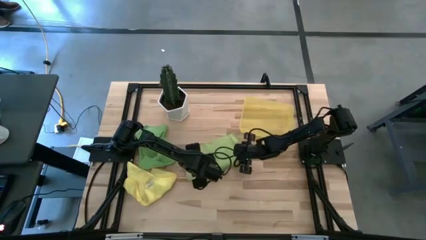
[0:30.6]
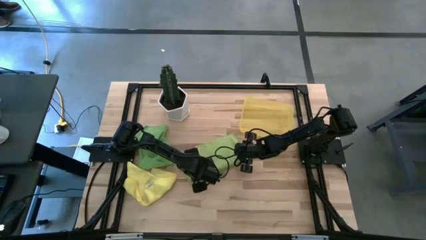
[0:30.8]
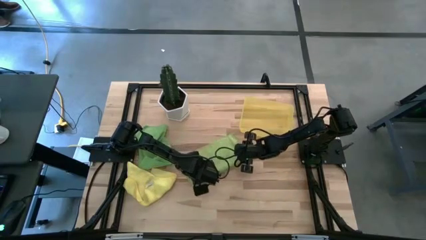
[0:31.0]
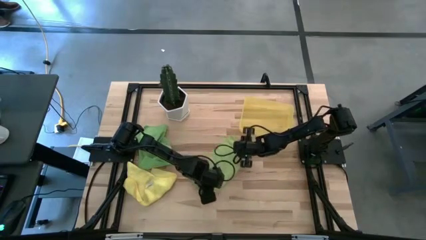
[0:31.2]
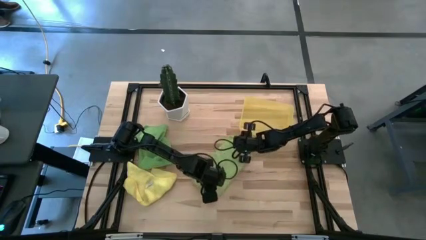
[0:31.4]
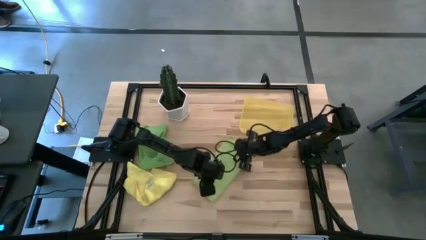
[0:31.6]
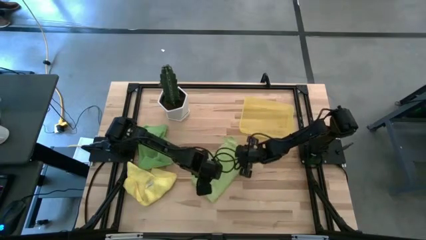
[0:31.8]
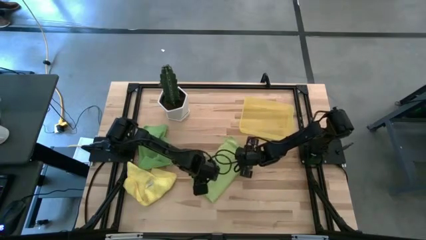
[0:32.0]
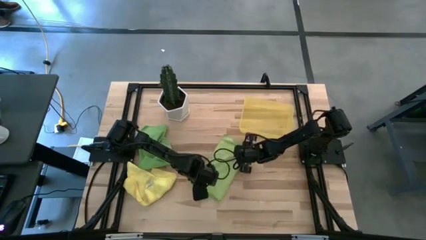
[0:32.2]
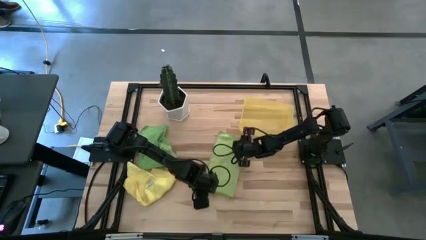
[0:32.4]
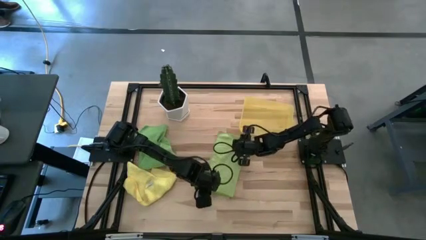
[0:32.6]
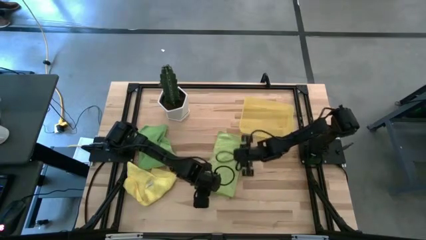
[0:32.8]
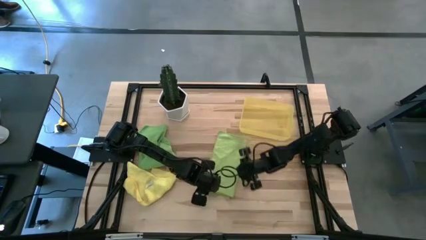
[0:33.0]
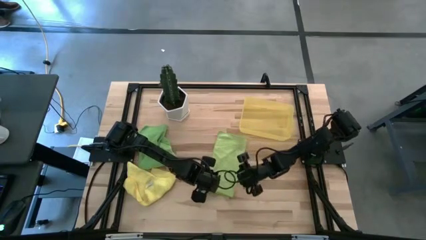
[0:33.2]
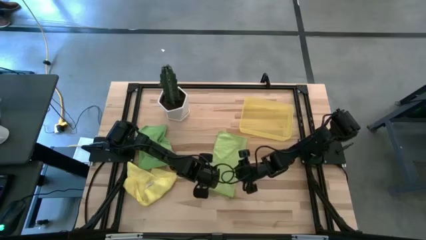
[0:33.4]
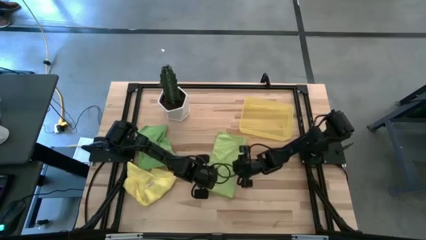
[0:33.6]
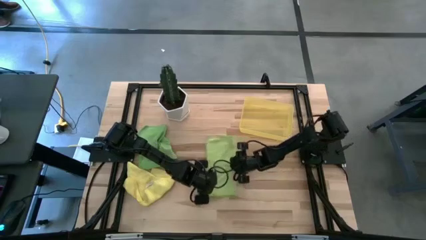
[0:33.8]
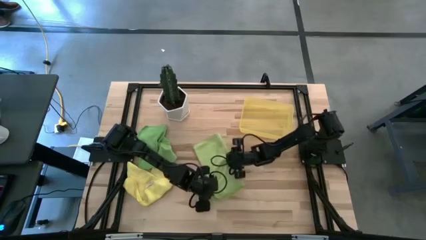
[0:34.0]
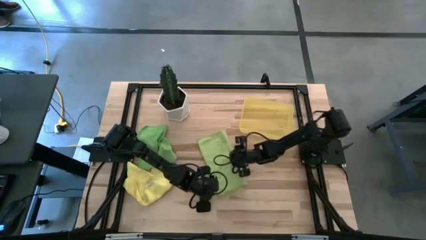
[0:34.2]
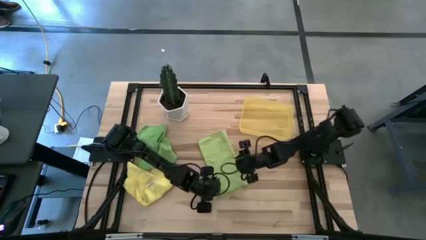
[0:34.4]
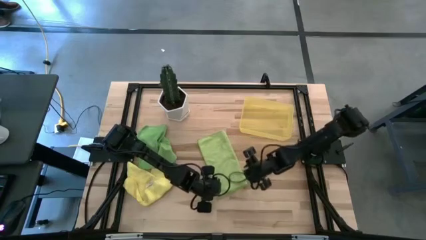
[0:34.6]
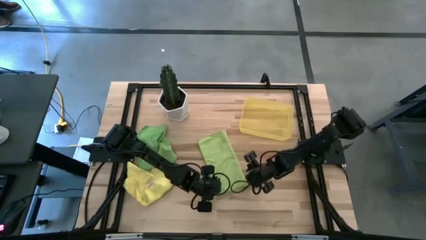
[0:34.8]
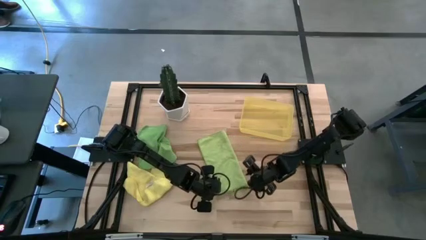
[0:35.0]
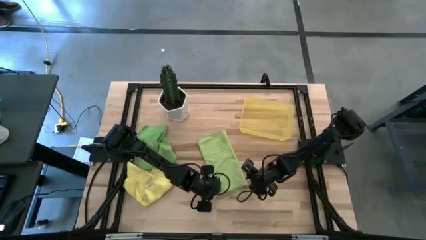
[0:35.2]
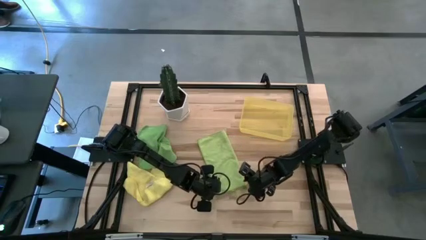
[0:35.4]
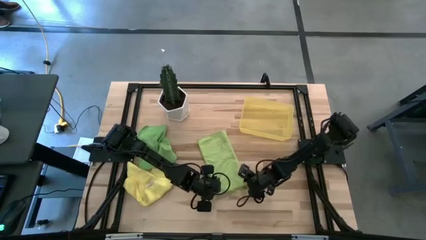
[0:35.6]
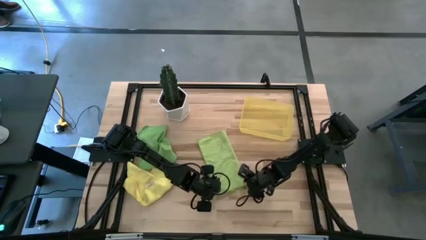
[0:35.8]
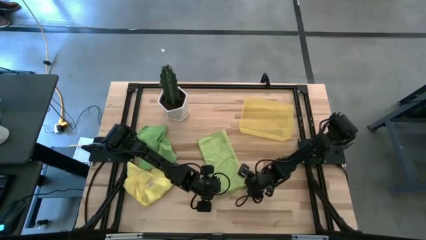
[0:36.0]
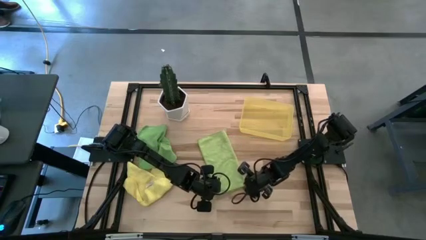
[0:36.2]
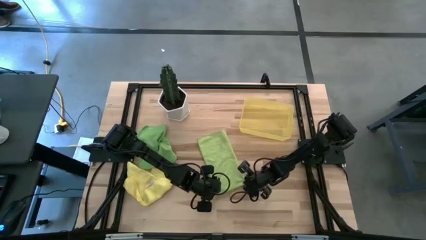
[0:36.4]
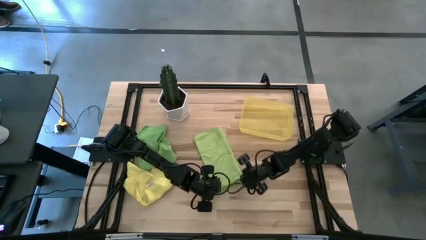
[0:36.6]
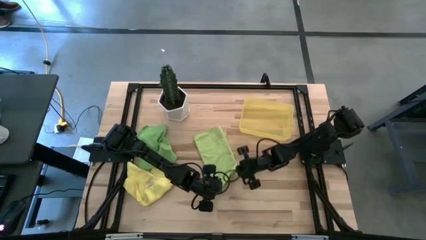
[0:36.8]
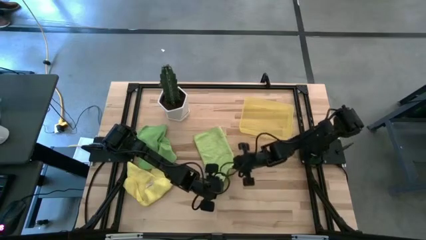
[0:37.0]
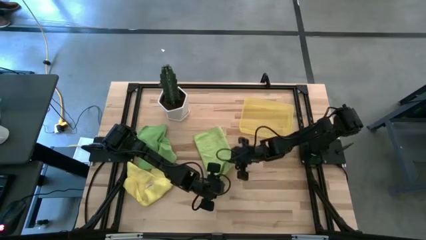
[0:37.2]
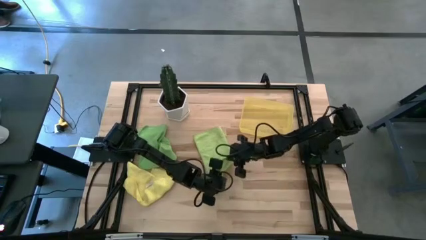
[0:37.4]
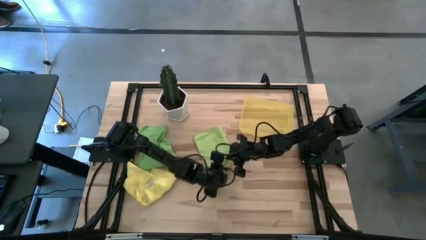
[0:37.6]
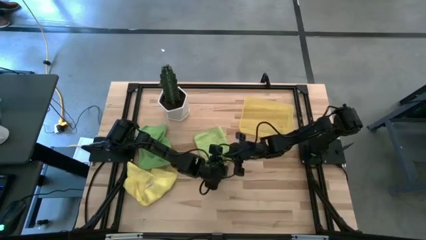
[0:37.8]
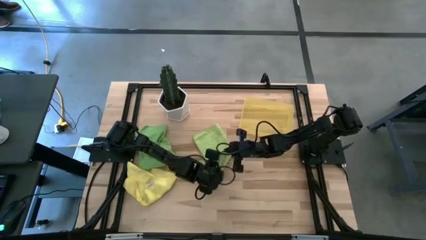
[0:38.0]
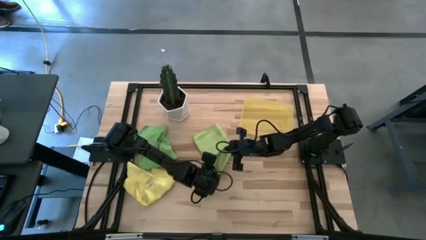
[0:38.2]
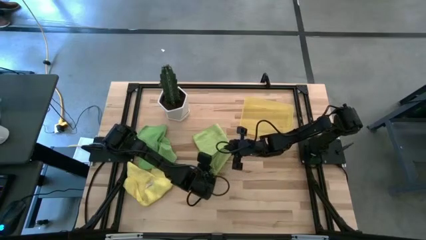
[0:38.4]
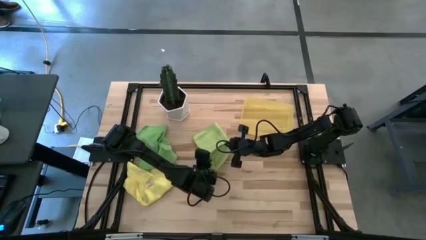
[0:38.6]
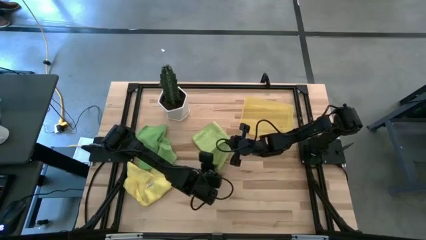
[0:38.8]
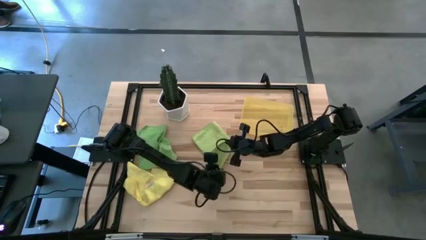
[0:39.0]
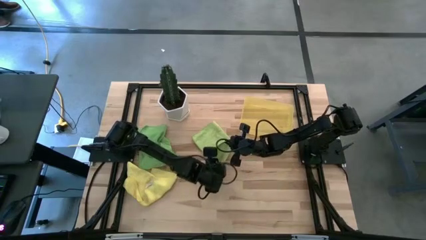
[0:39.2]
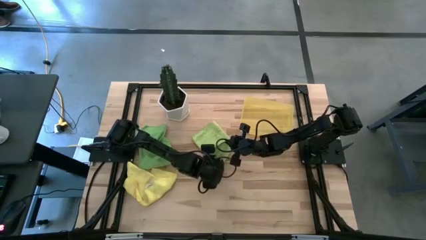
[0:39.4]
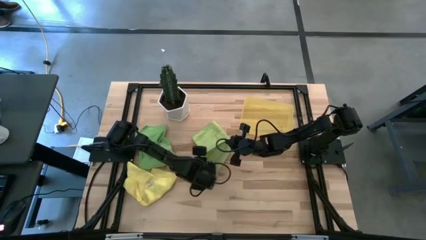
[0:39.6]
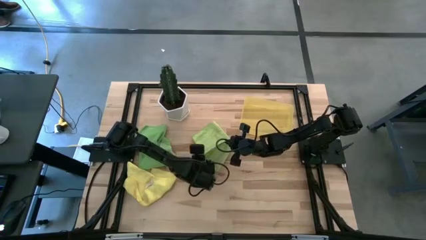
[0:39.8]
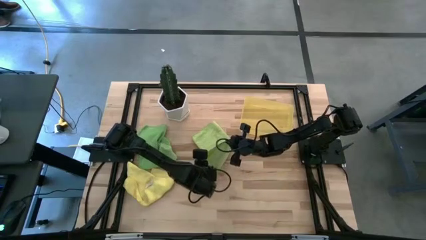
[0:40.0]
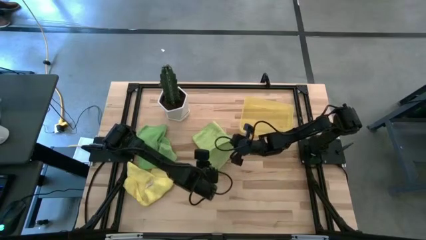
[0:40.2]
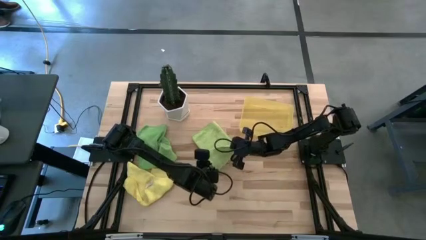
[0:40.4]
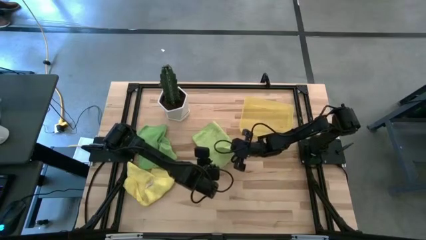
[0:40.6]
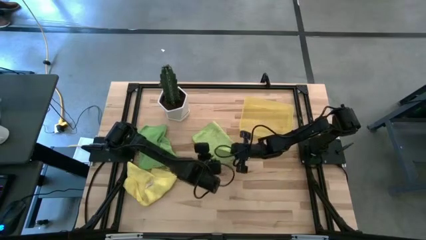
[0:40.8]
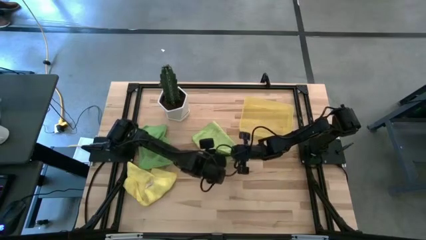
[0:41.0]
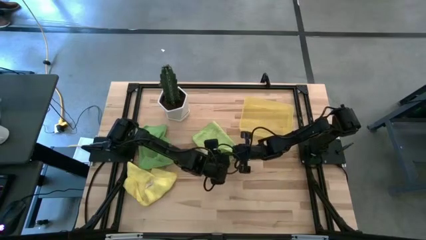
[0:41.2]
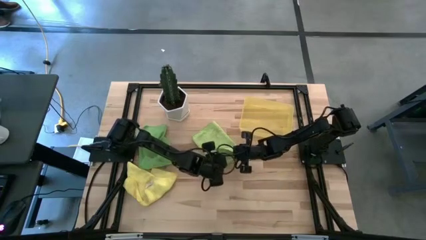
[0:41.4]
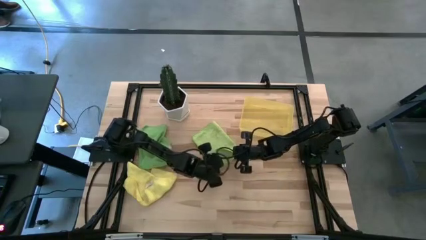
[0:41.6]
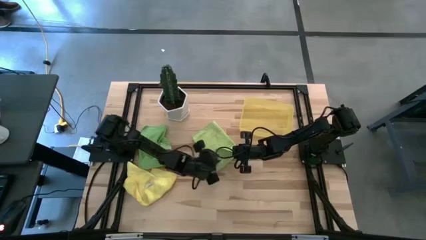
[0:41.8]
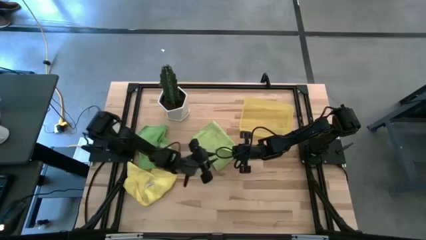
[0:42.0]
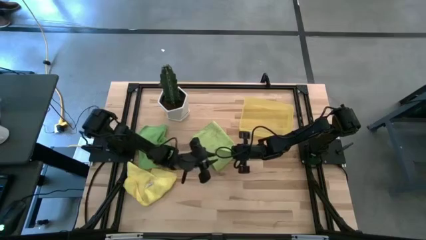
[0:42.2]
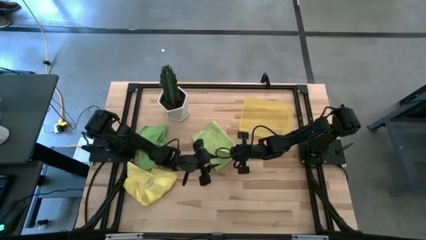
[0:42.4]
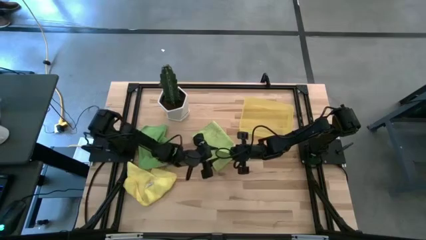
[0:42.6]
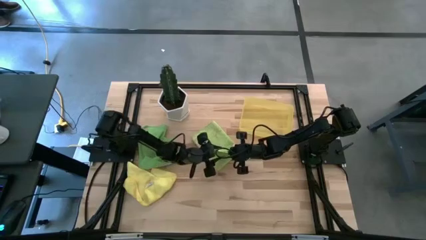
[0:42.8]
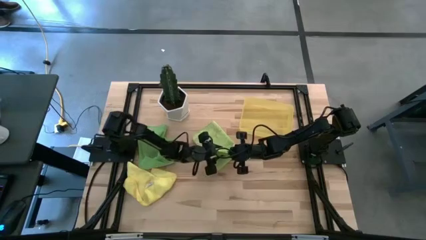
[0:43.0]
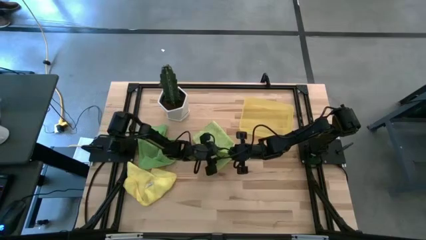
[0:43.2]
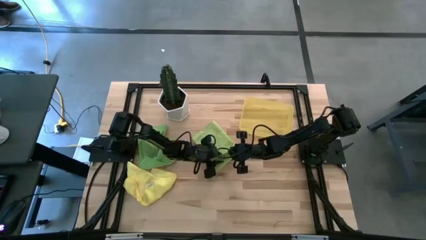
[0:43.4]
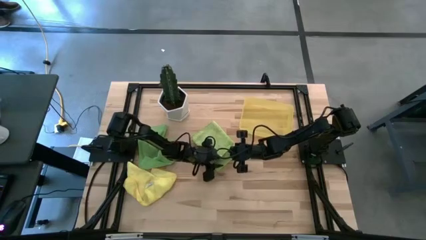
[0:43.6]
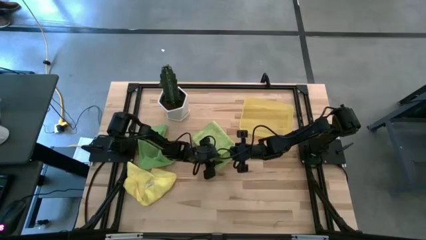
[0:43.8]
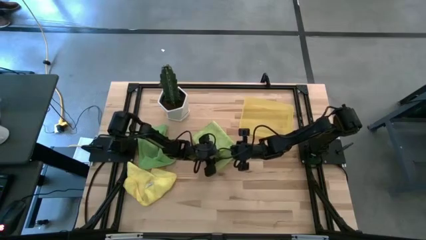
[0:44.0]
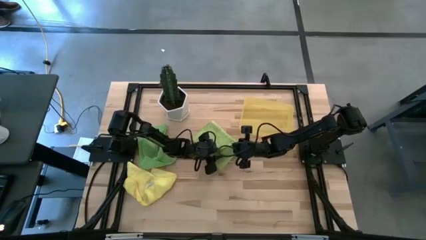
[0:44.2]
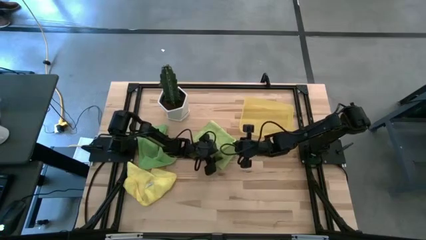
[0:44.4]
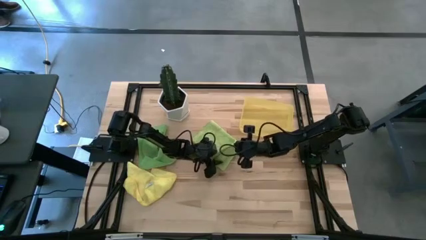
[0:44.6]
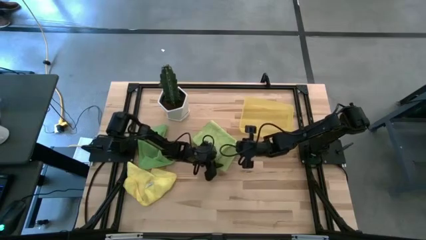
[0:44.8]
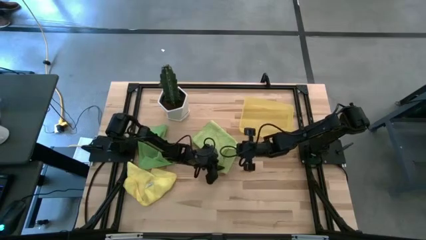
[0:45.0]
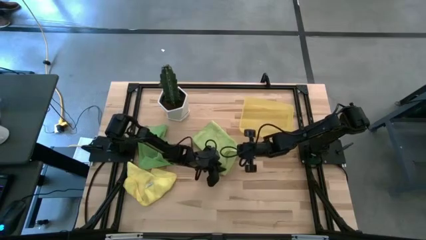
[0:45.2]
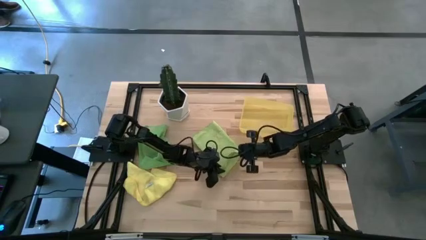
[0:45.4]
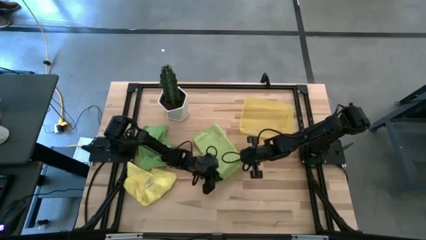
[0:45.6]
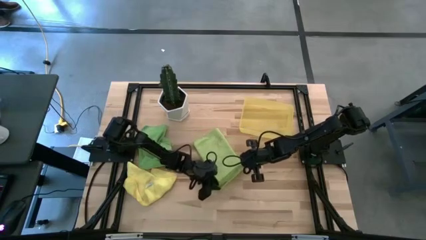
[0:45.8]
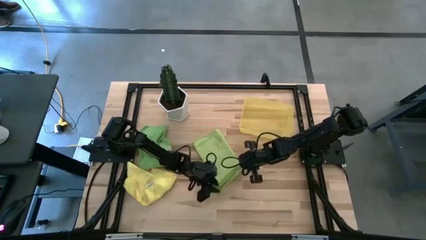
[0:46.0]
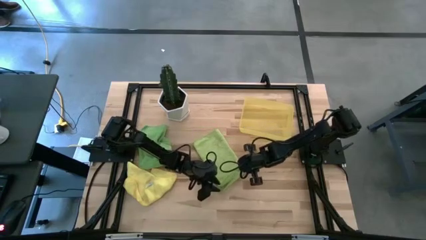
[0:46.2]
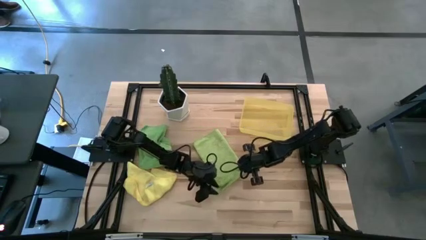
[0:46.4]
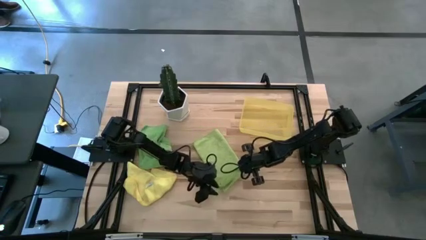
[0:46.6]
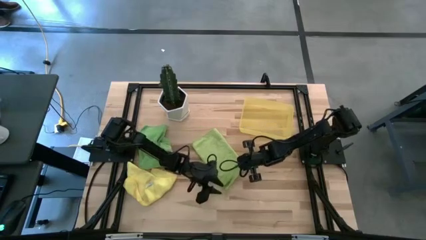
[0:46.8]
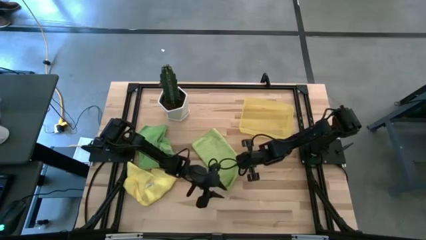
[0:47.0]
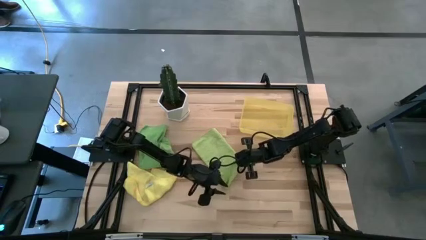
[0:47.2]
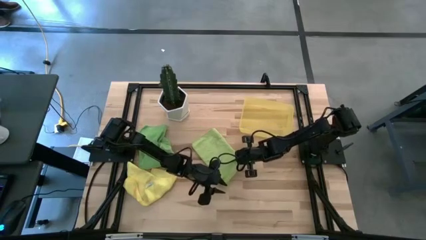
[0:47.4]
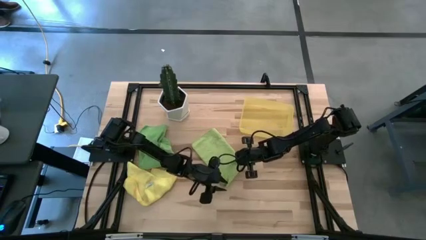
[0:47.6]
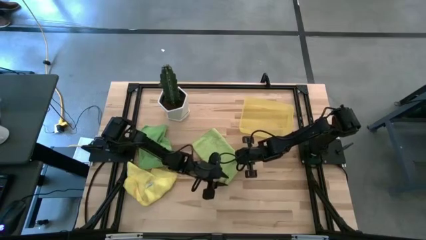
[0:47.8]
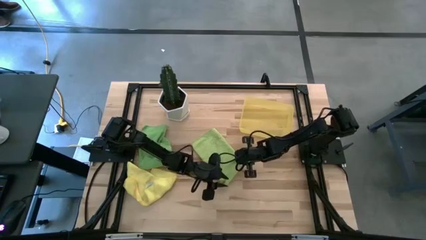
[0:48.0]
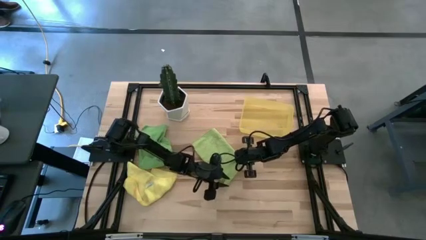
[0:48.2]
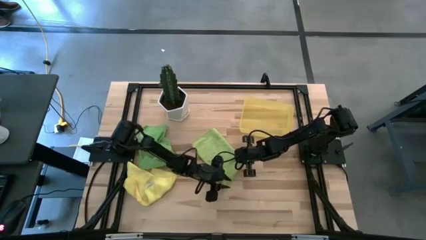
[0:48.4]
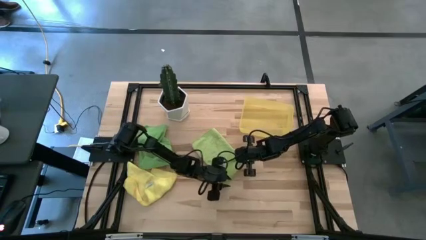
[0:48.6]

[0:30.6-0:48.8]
Task: Roll microfiber towels into tight, uniform cylinder then place into a basket
Roll the light green microfiber cloth
